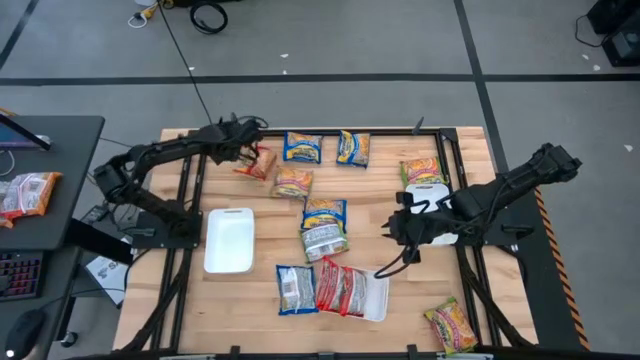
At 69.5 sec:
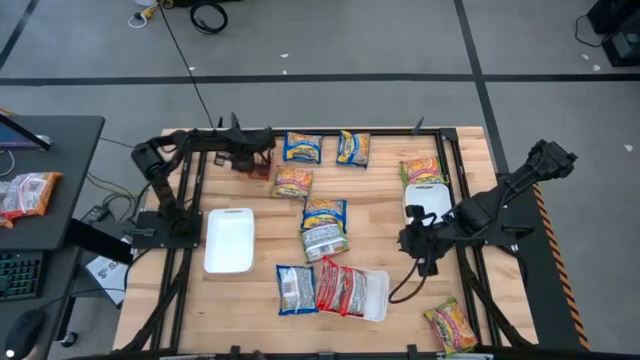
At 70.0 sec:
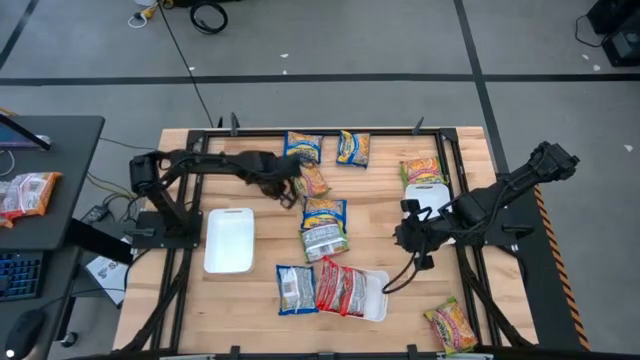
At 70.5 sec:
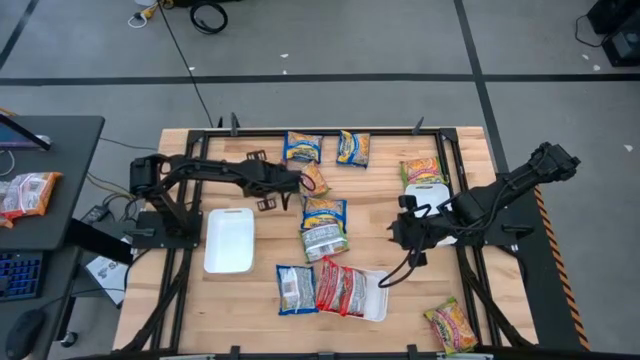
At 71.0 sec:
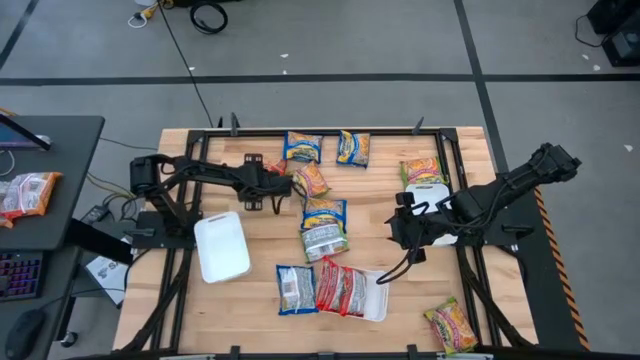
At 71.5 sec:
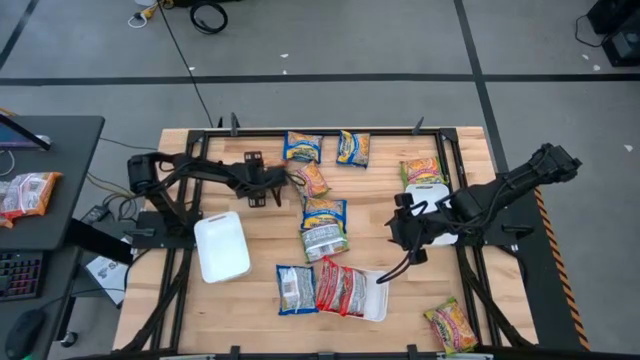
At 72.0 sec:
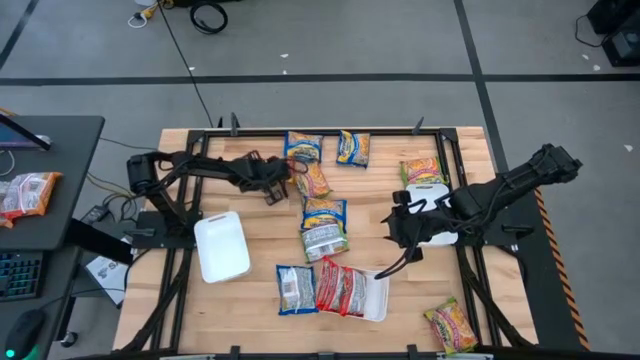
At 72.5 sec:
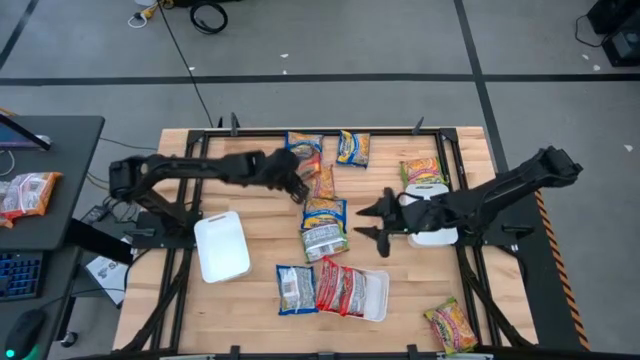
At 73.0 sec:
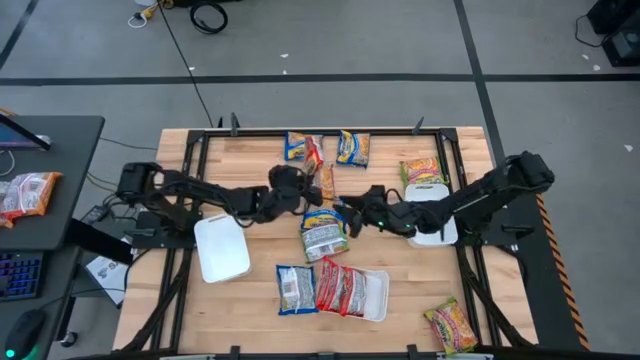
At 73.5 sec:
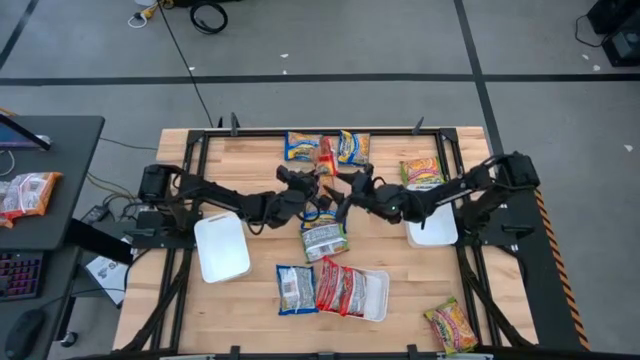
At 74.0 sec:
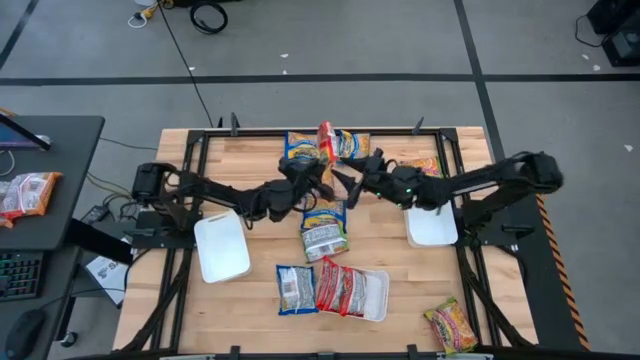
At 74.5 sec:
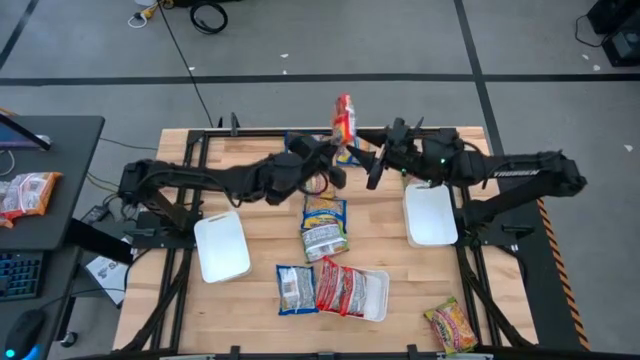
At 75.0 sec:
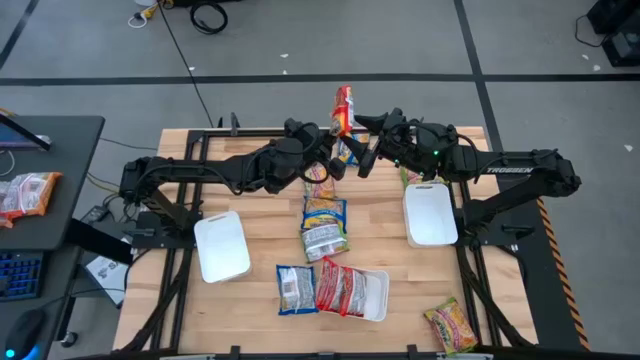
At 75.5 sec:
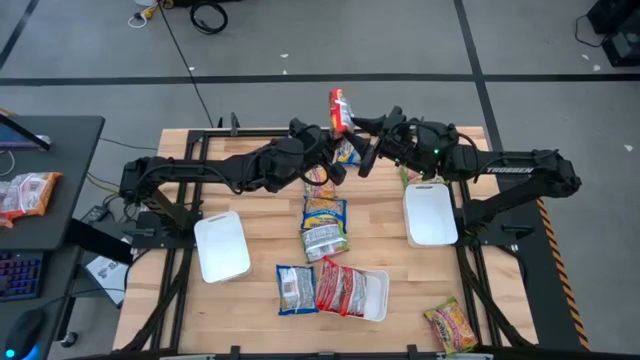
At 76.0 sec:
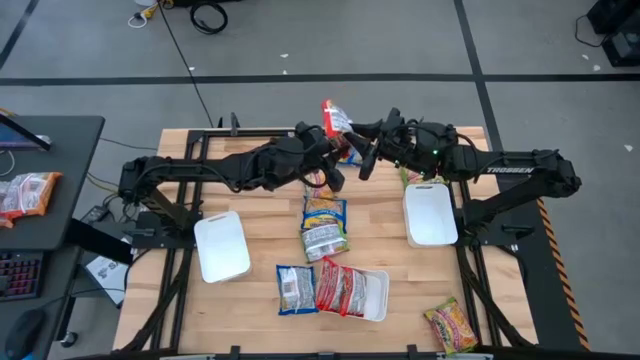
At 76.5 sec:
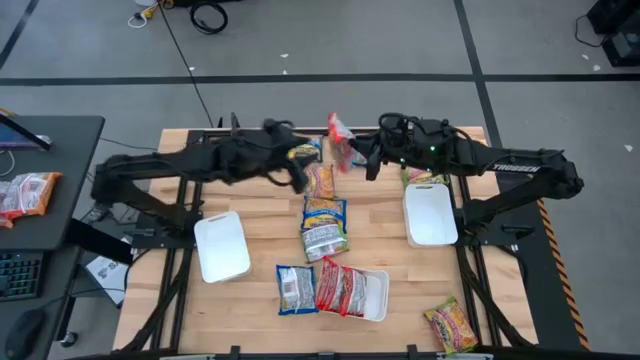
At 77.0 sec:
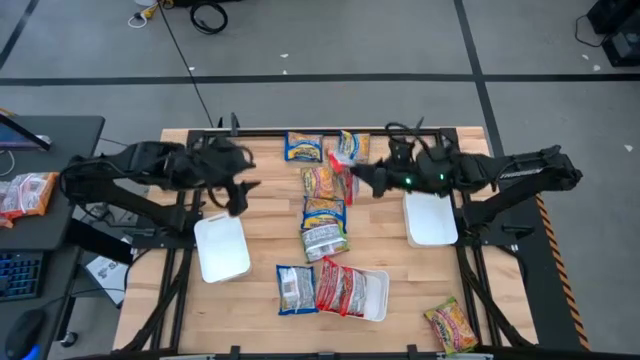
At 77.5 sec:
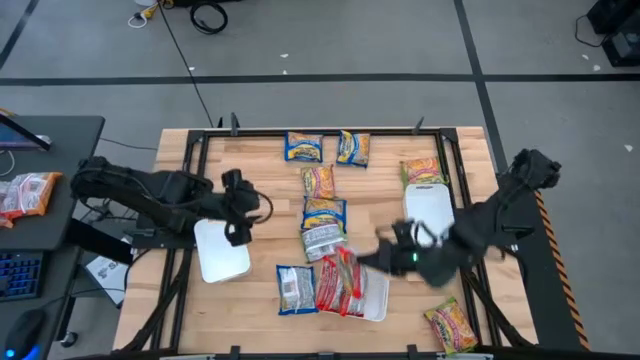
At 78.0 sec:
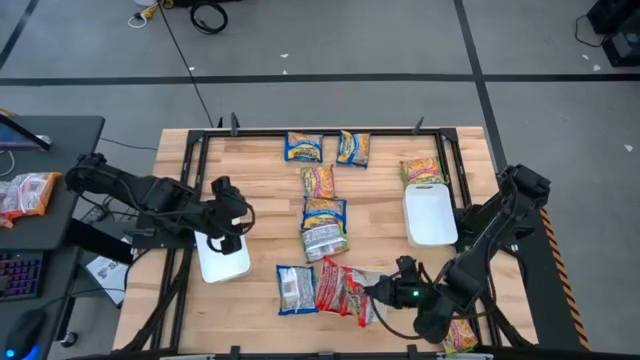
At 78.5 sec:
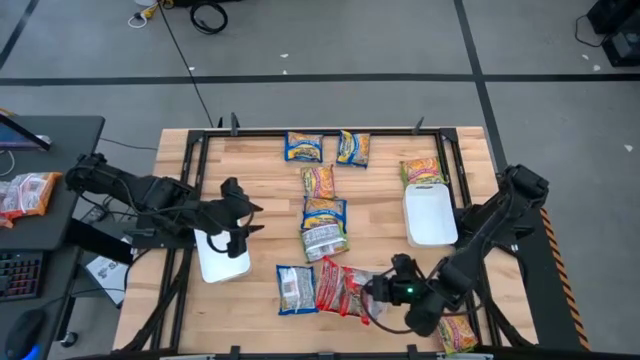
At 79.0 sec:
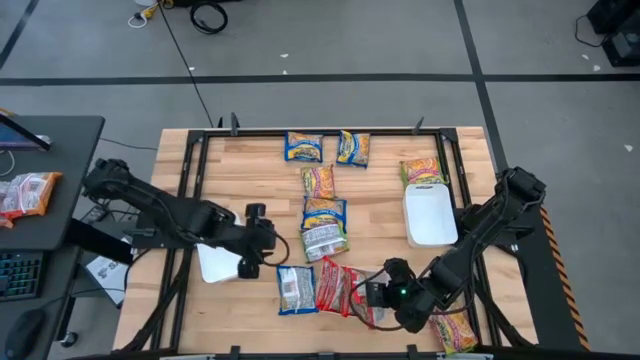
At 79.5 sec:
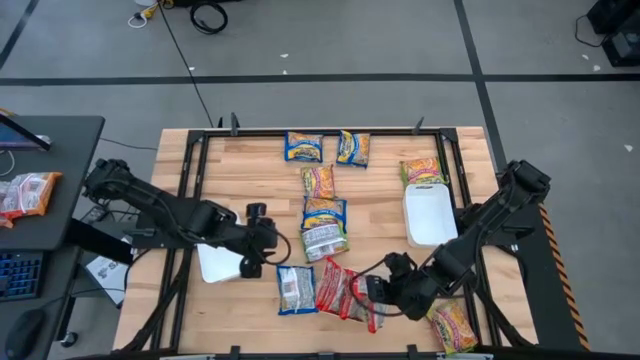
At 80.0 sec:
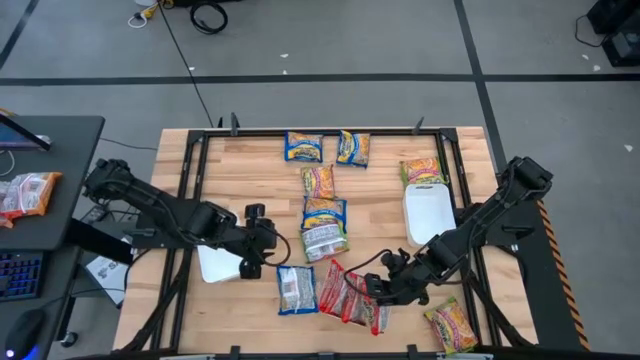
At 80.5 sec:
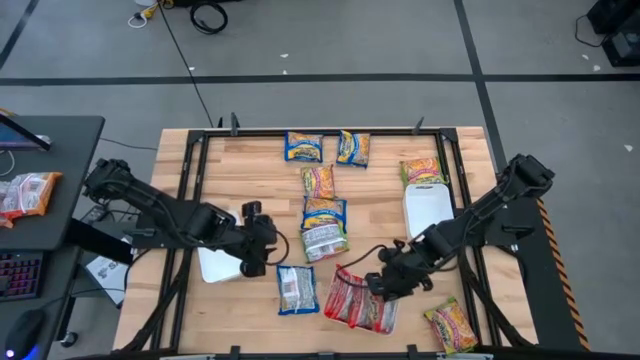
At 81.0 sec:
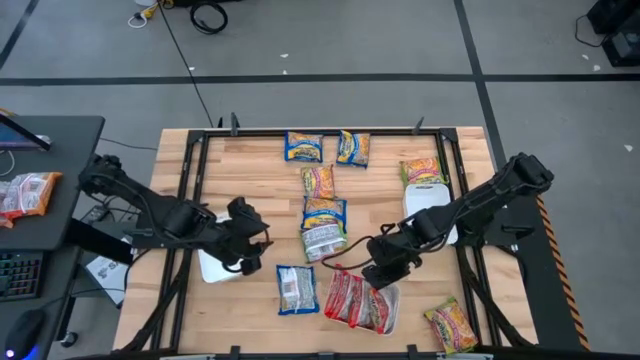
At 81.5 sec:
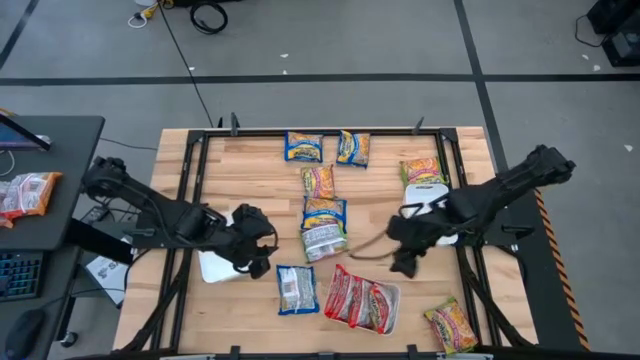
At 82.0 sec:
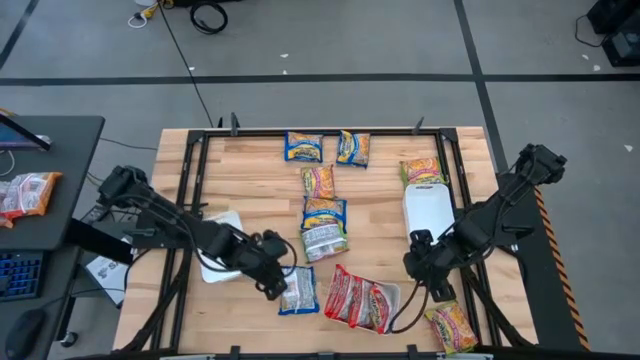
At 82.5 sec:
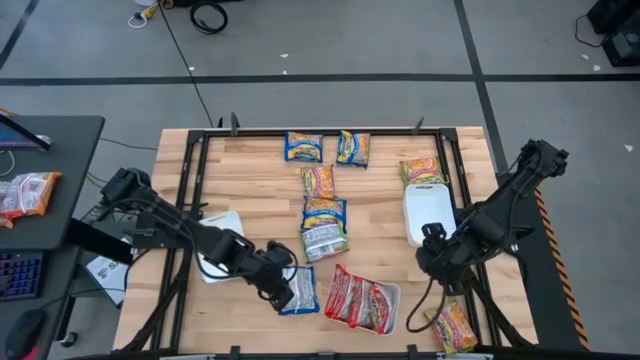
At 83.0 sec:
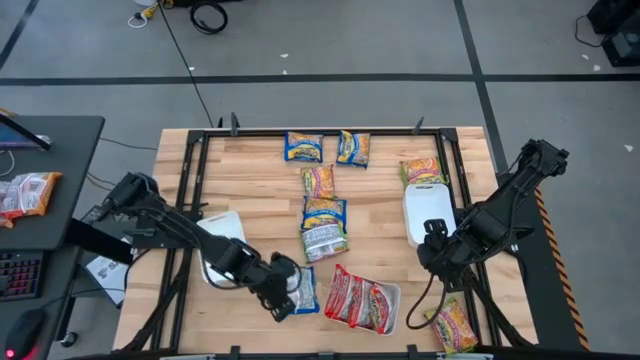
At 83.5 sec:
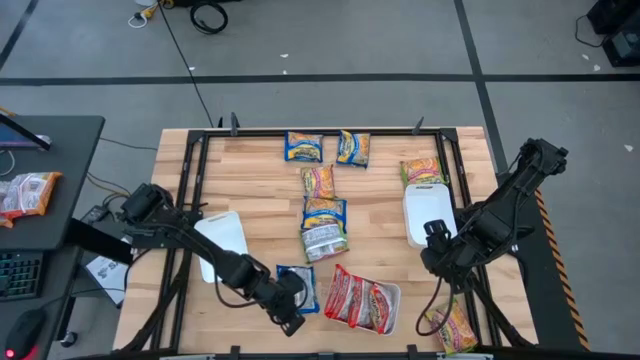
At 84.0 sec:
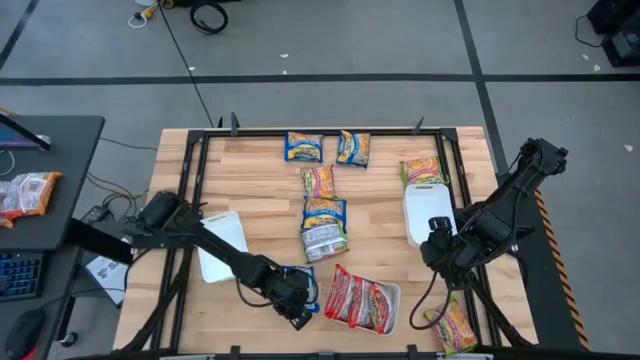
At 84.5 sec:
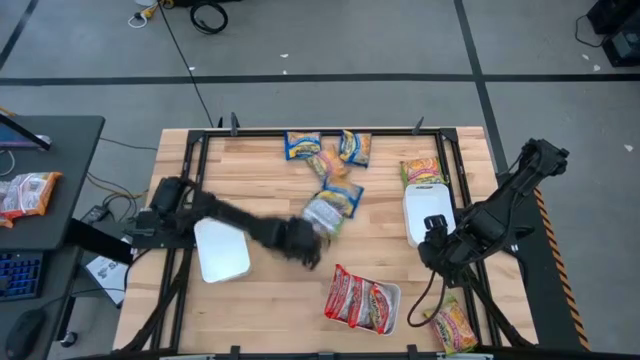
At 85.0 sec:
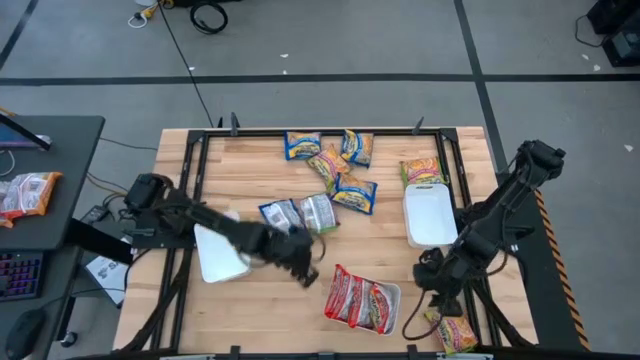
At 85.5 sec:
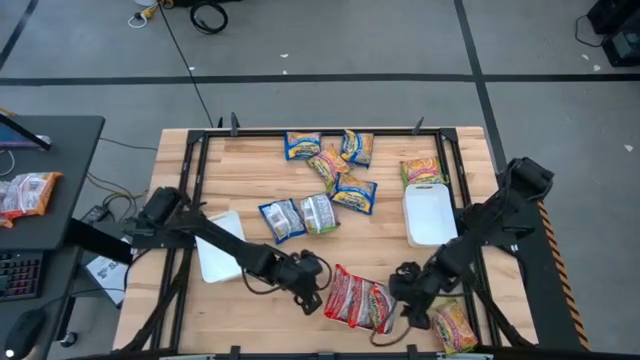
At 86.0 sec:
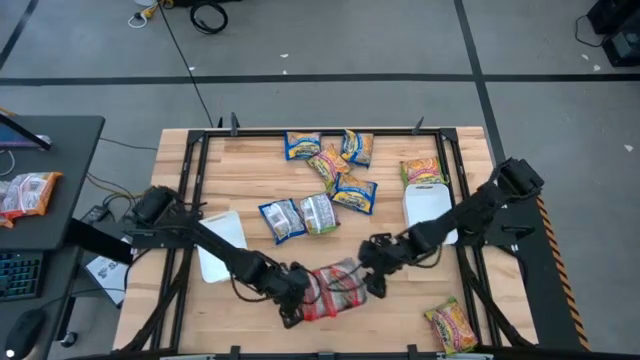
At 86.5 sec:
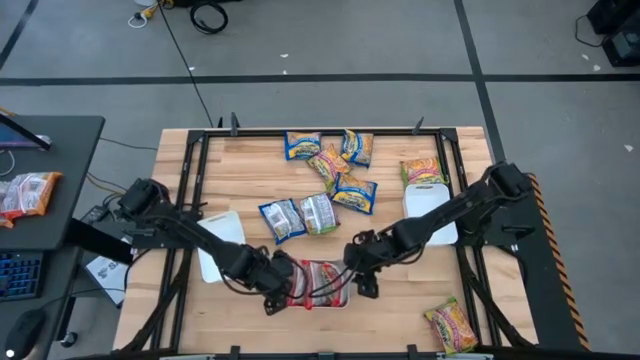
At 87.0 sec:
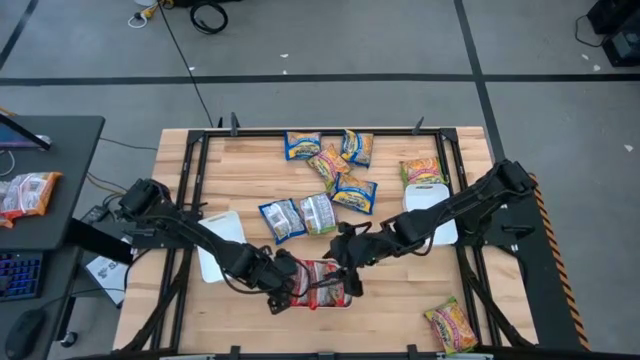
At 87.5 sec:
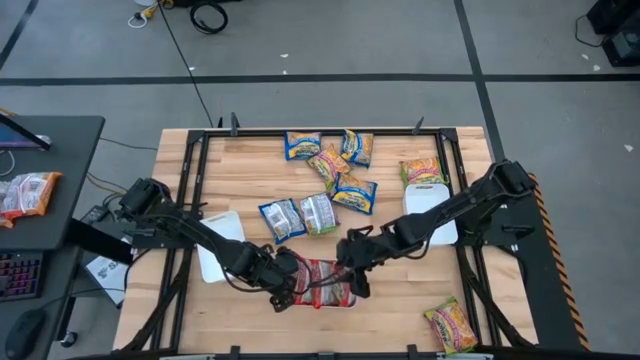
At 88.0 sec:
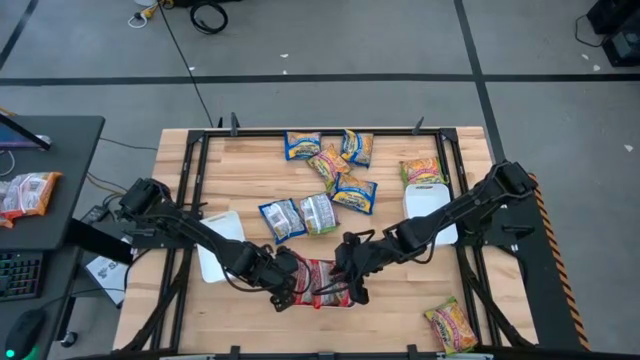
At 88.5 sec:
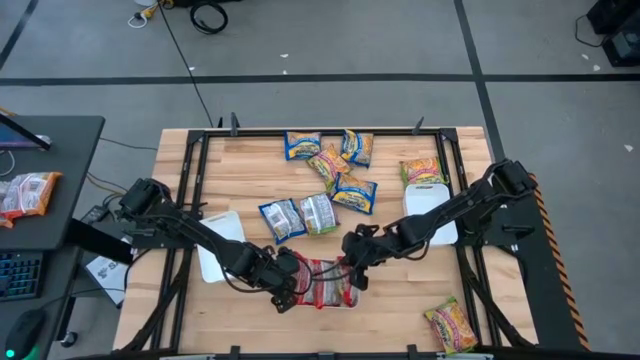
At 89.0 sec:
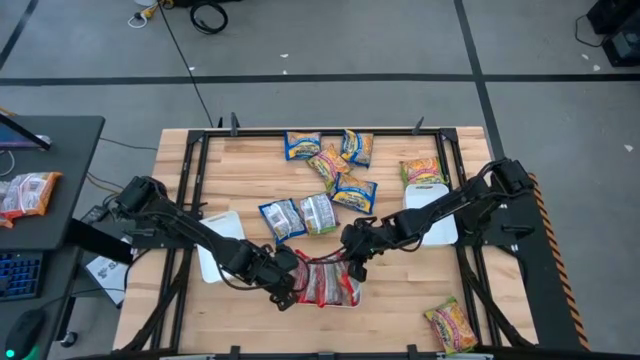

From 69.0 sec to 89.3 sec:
Task: Sort Maruchan noodles
Put the red noodle pack into the bottom white bin

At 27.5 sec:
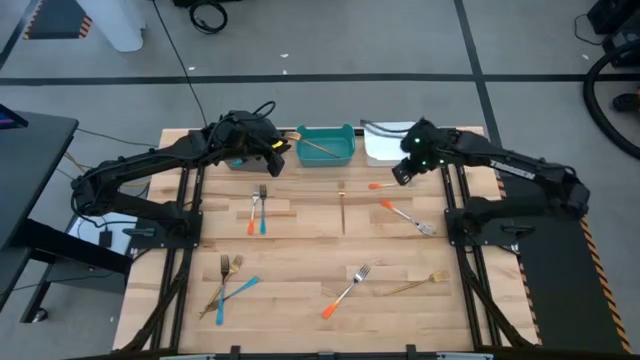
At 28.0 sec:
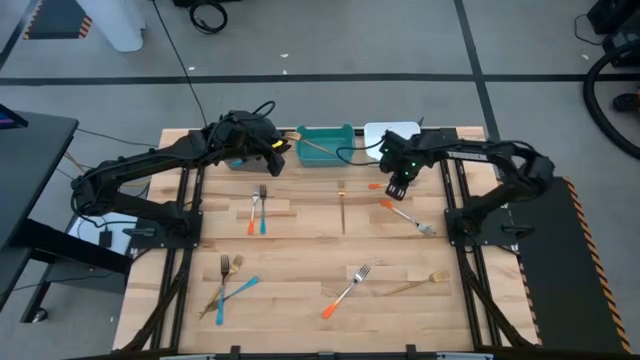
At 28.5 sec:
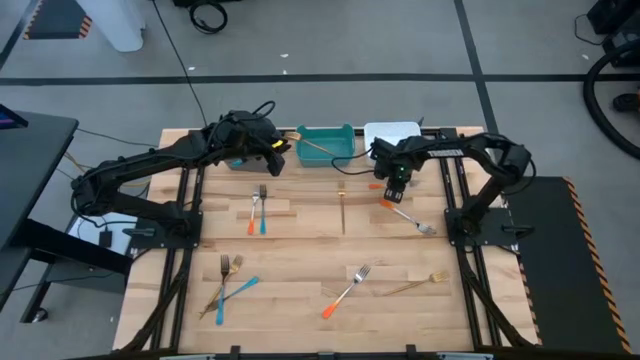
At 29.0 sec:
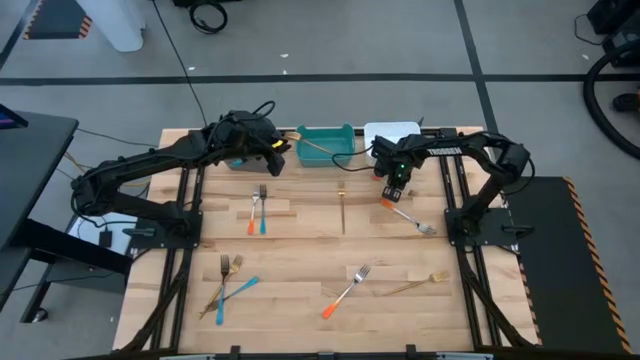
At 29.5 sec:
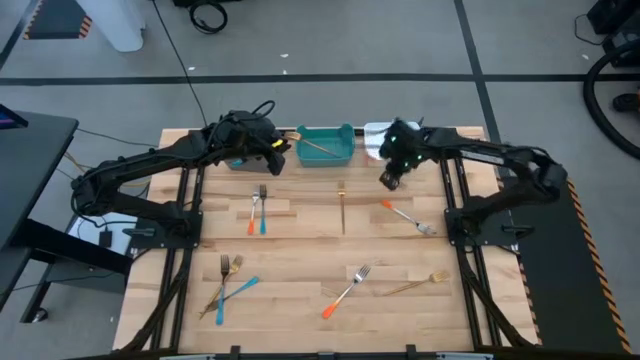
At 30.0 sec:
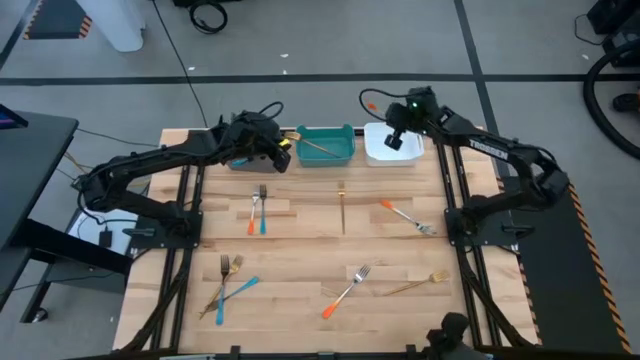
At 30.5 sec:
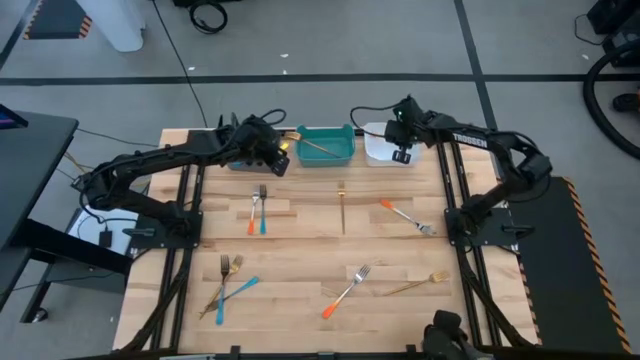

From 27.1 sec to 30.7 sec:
Task: Sort silverware by color (type)
Put the orange fork into the white bin
